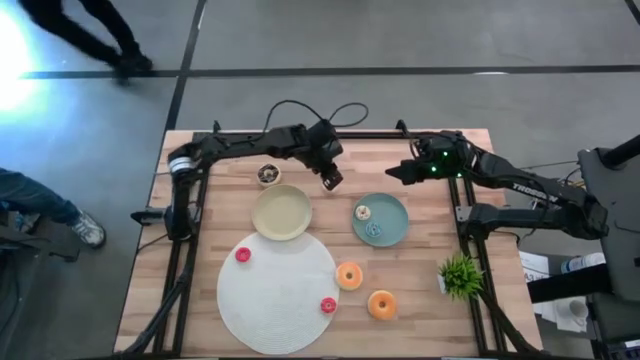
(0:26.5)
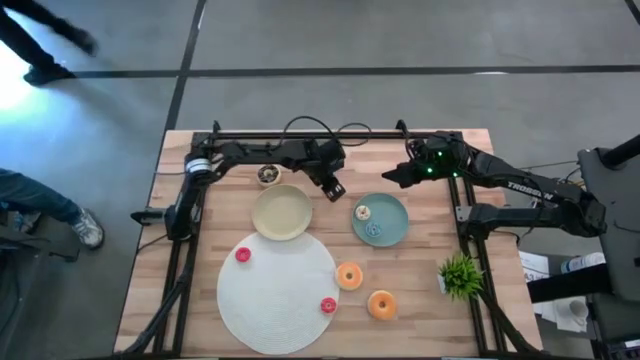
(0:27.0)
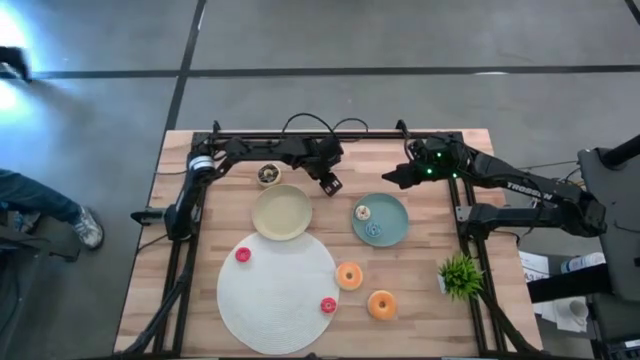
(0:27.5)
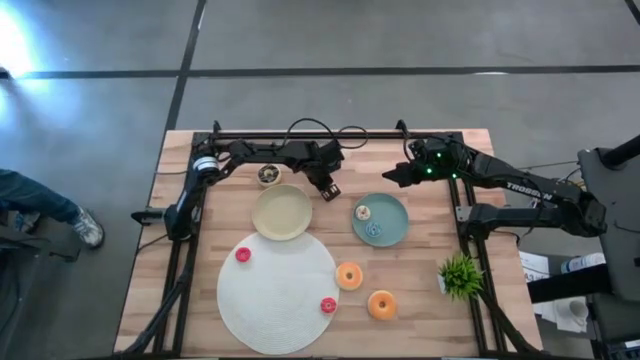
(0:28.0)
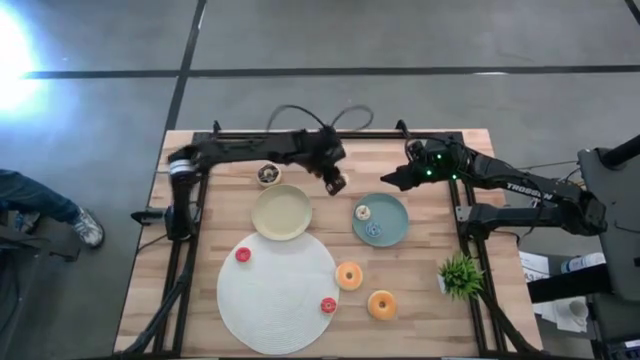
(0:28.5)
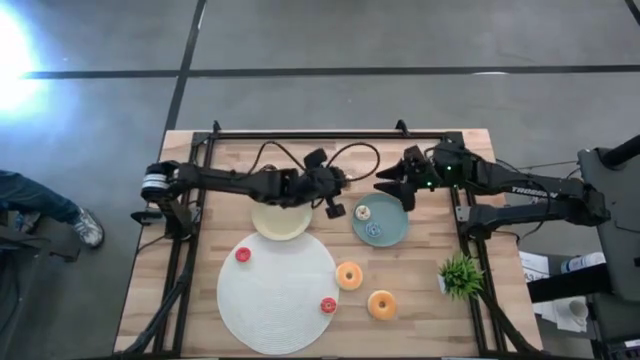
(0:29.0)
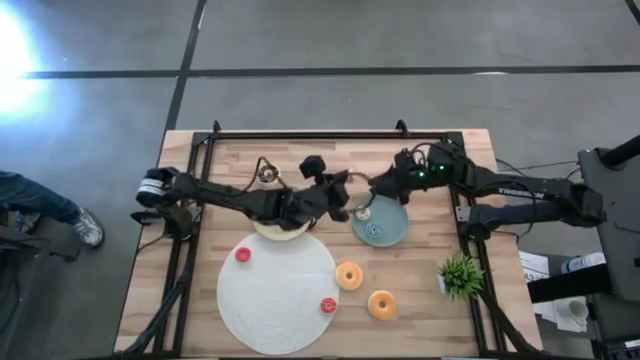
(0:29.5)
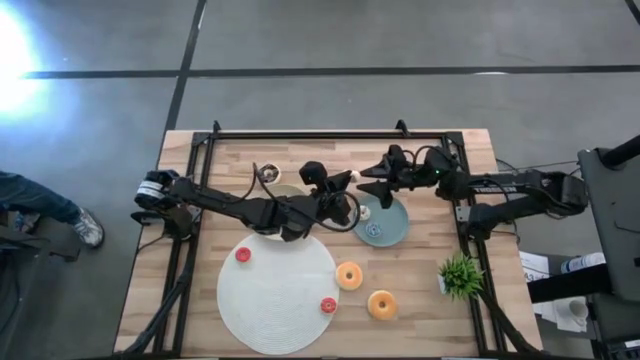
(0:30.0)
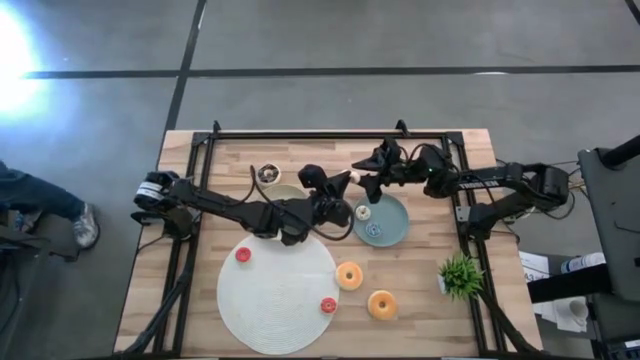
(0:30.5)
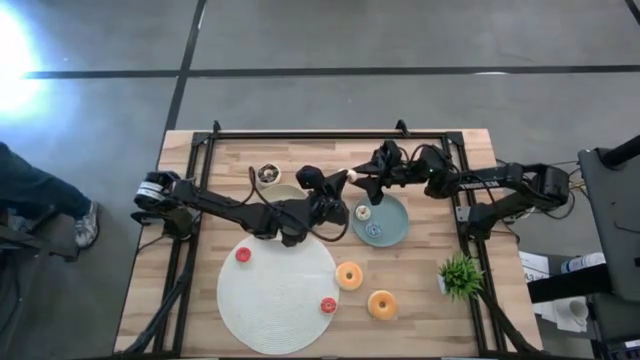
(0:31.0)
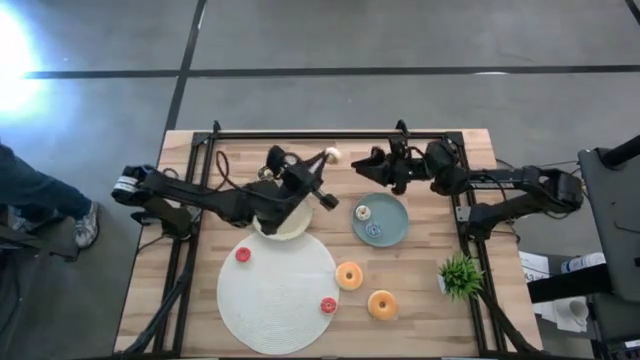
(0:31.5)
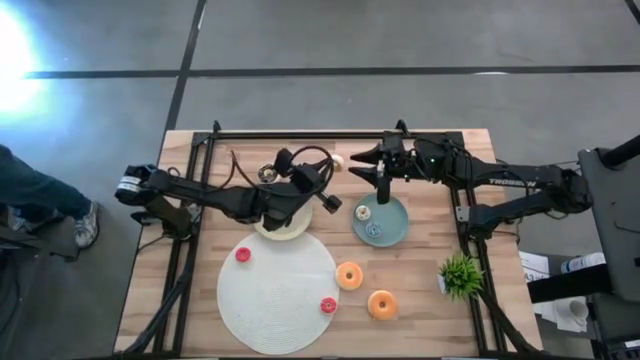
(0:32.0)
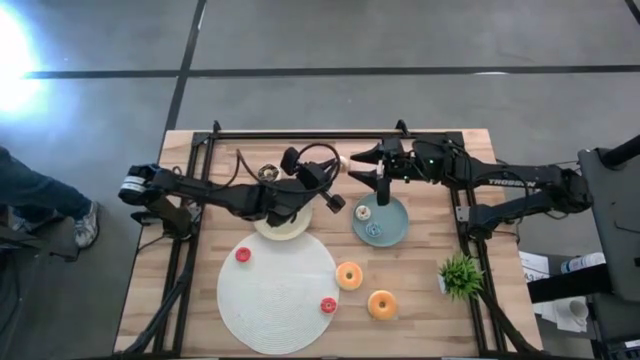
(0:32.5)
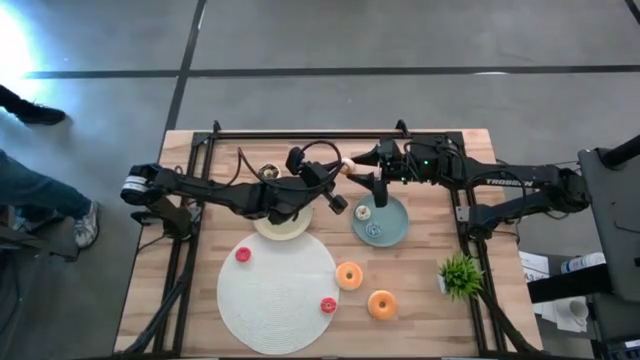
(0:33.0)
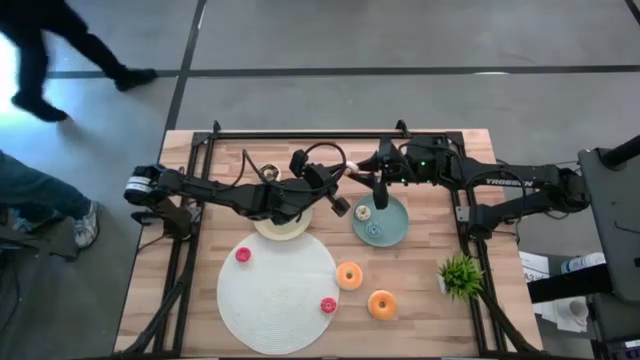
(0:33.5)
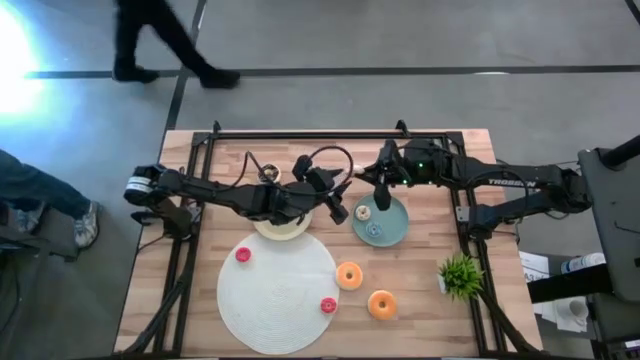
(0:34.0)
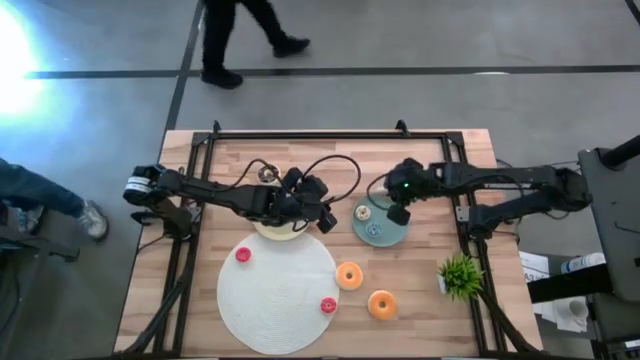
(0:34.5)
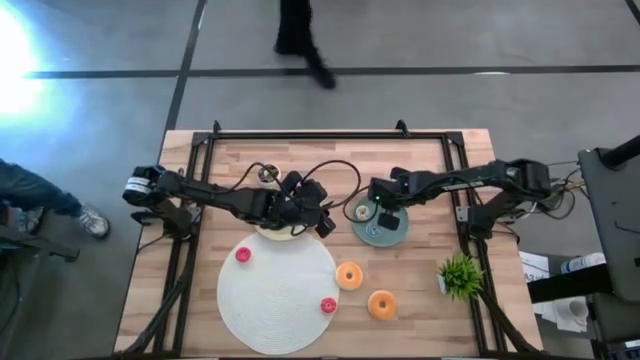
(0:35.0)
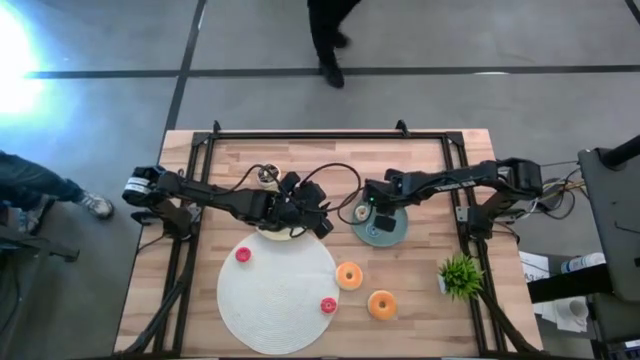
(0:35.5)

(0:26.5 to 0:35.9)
Task: Pick & Place donuts
Put the yellow donut on the blue plate

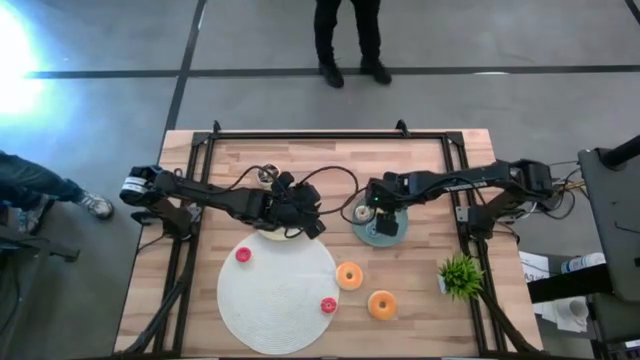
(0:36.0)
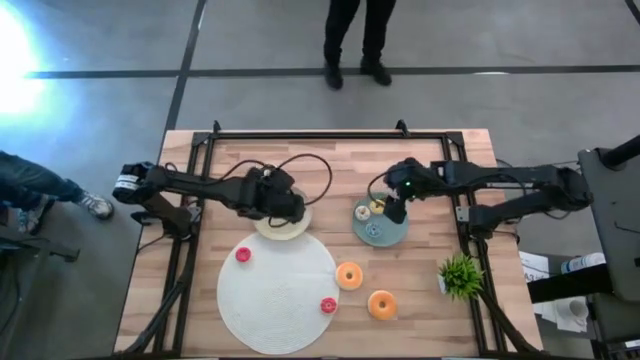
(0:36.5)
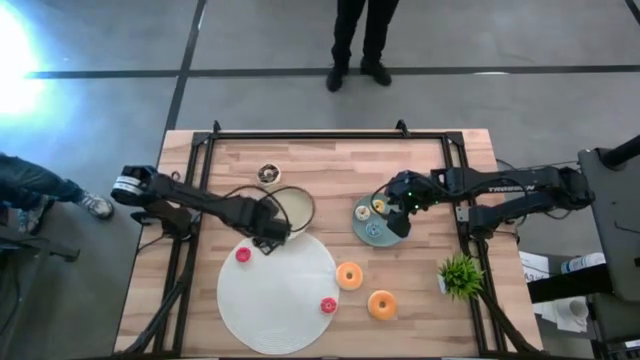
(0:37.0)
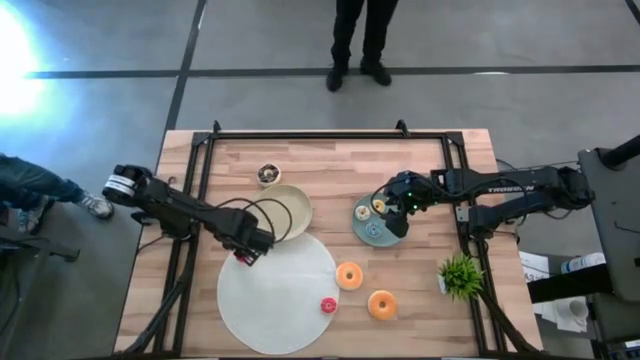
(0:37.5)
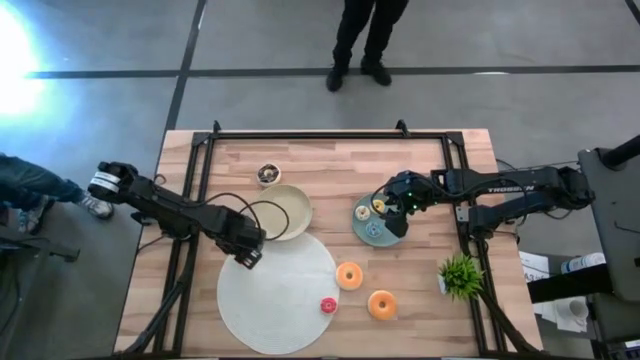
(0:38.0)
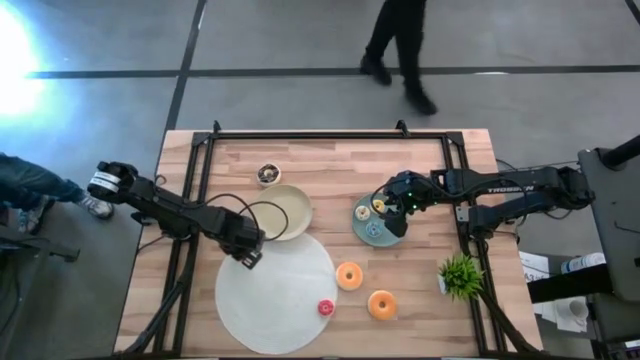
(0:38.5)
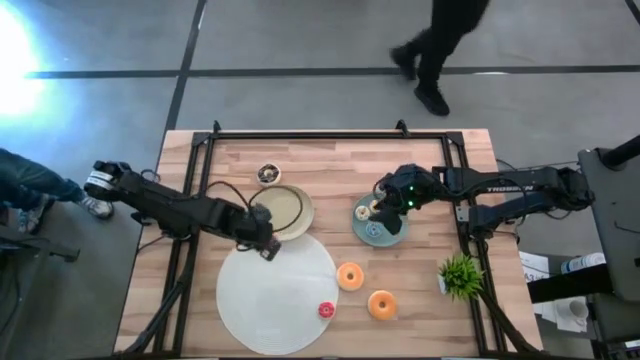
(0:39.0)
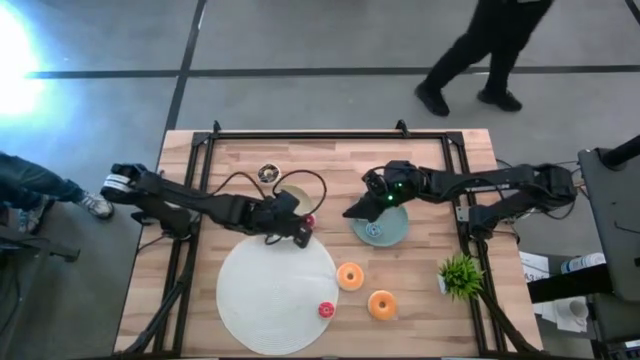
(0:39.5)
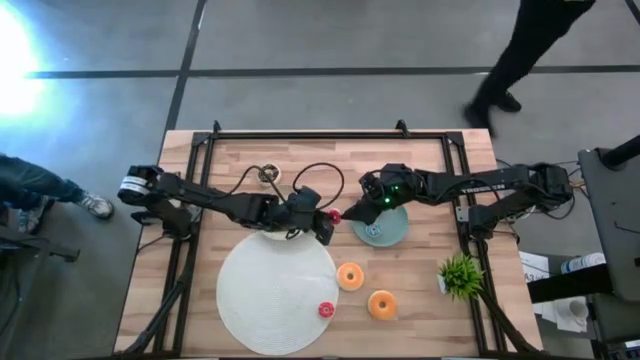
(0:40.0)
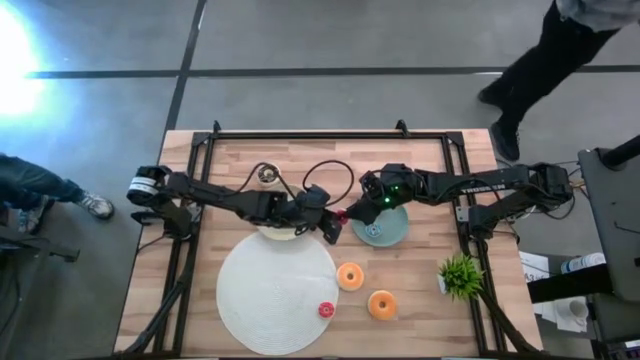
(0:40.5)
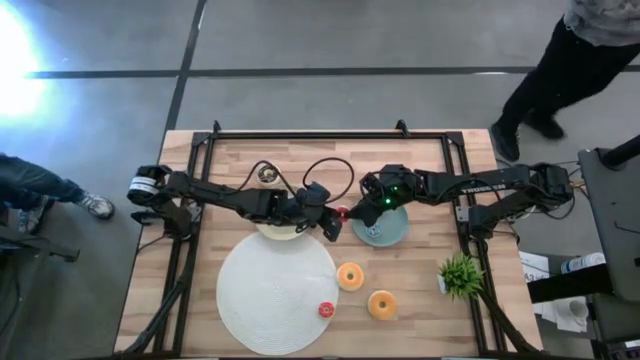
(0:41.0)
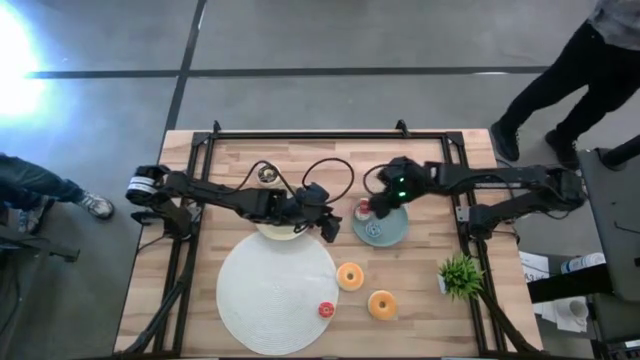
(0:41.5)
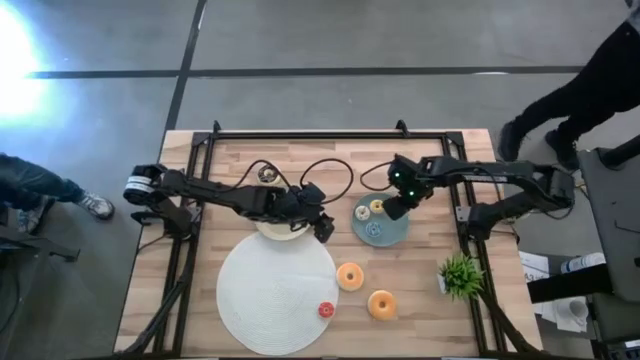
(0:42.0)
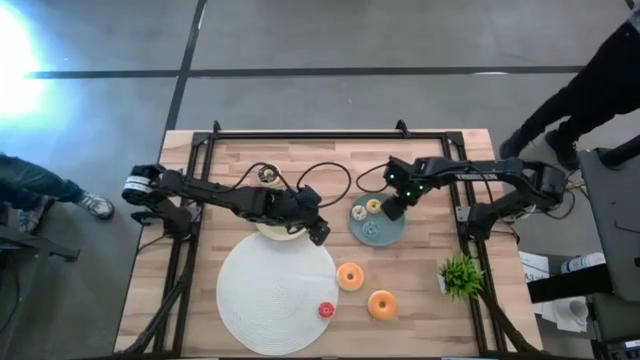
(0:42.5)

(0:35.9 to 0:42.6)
Put the red donut on the blue plate

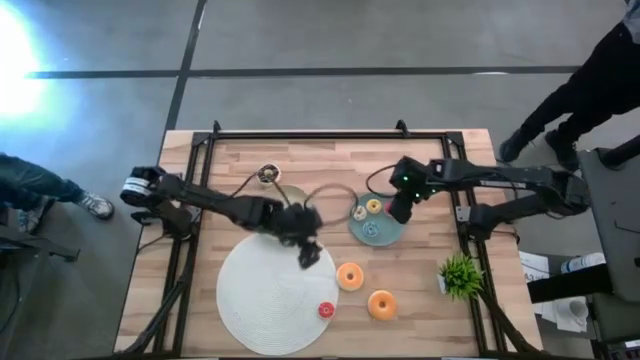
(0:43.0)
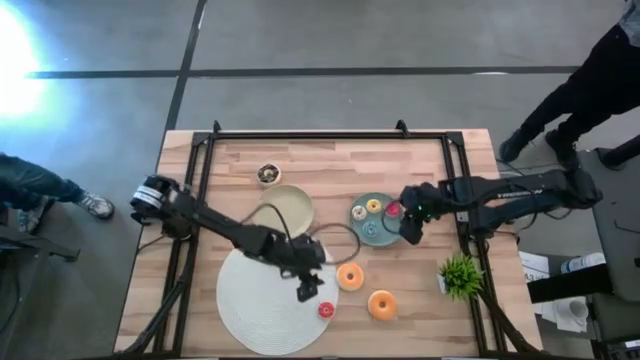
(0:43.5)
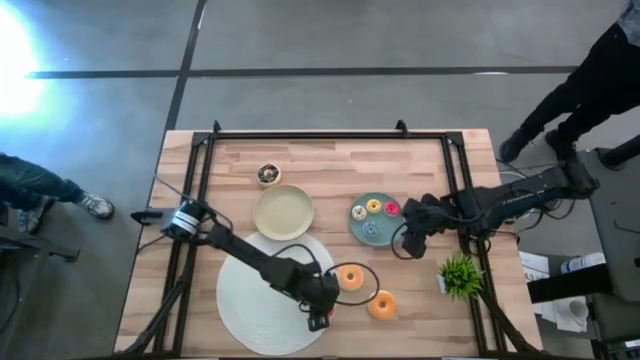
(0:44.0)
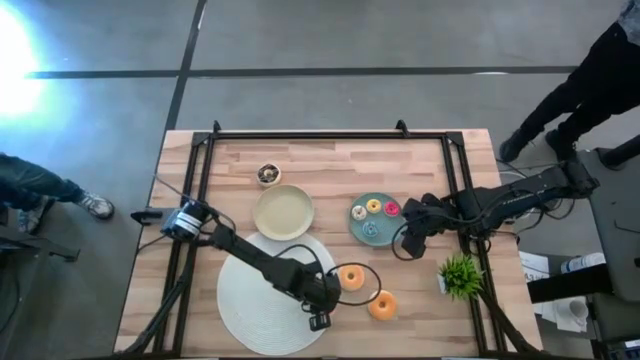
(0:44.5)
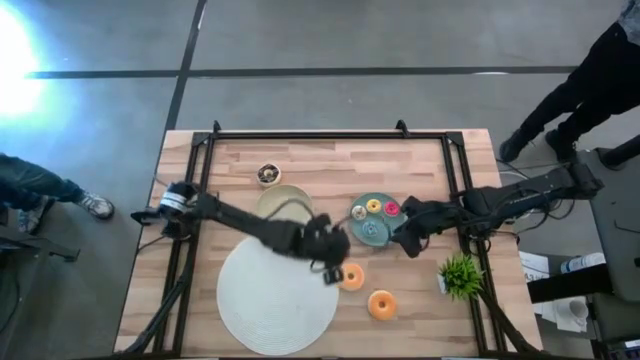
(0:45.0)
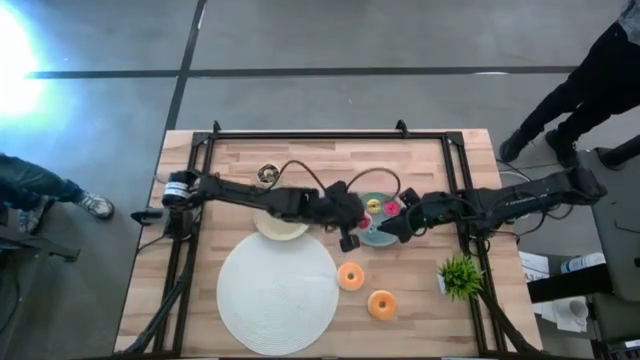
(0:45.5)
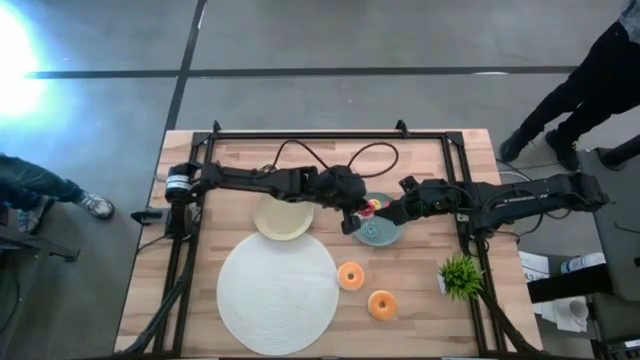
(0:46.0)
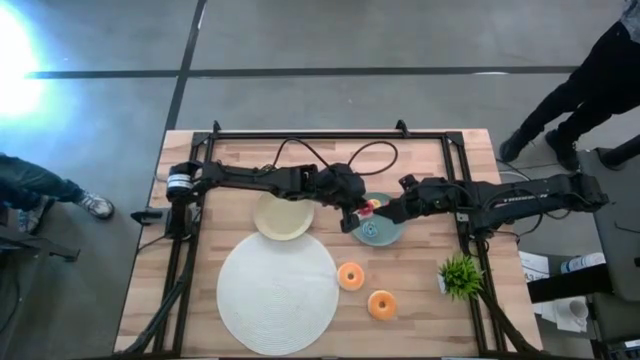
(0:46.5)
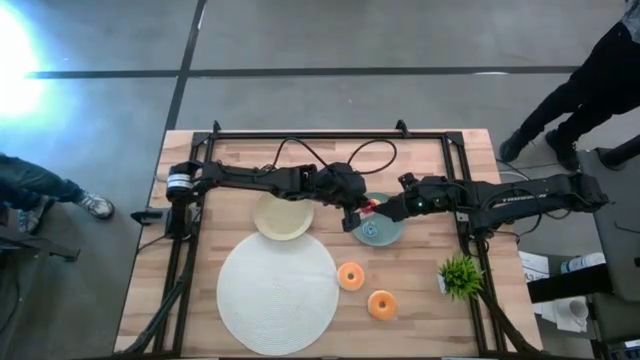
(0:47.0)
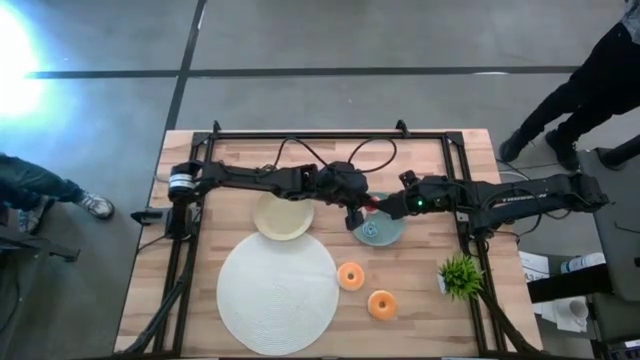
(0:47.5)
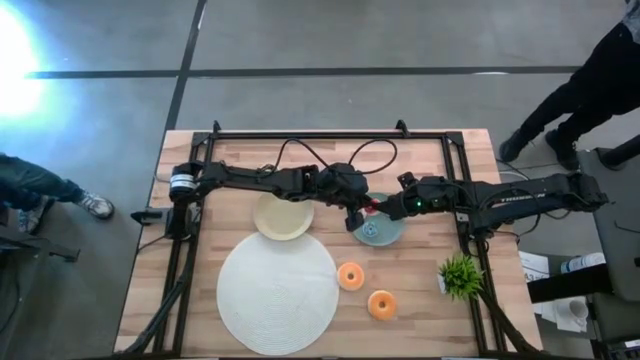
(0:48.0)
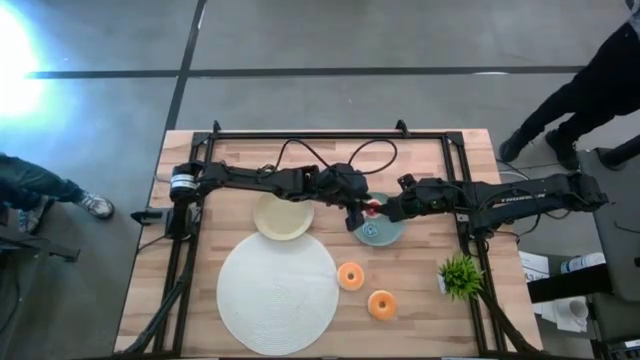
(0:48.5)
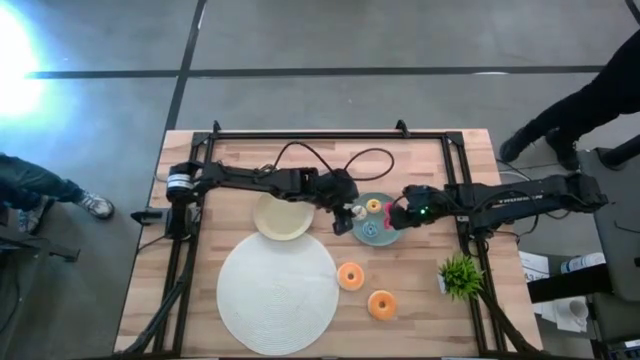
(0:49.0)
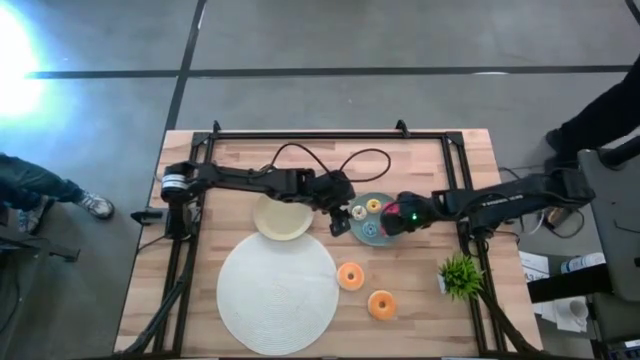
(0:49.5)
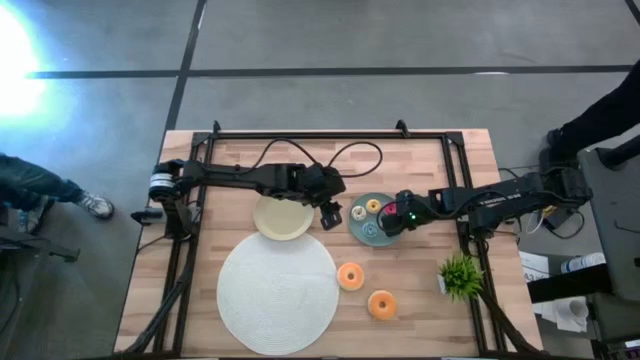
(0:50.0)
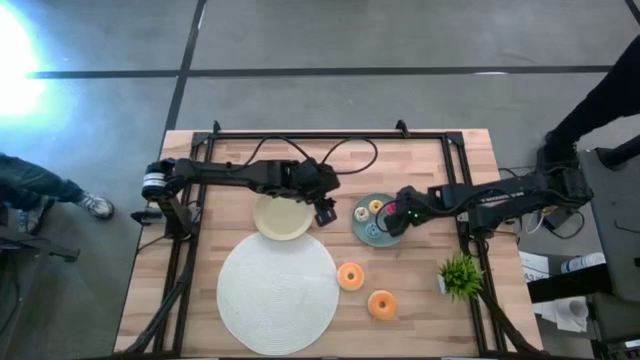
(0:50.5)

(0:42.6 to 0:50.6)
Put the orange donut on the blue plate
